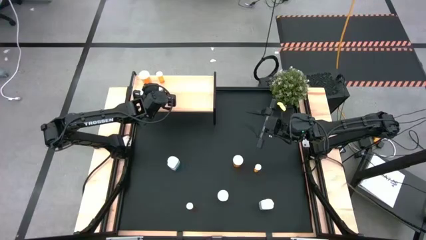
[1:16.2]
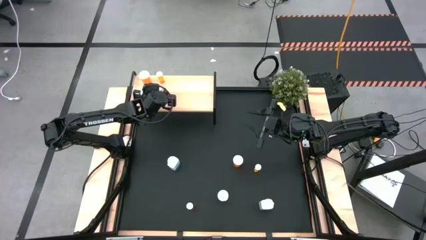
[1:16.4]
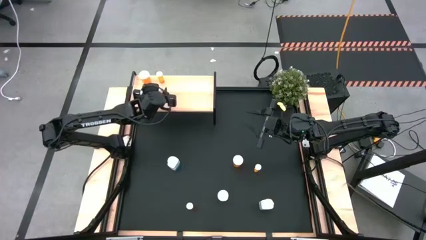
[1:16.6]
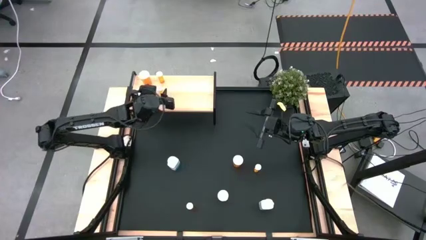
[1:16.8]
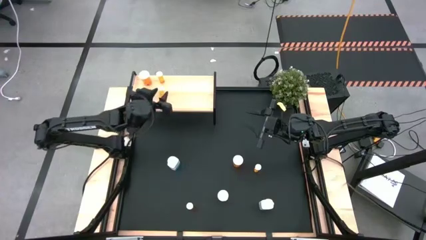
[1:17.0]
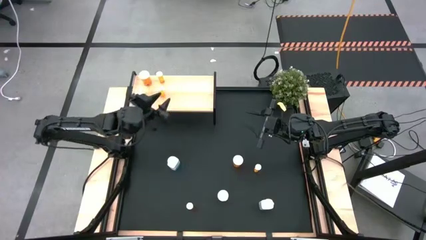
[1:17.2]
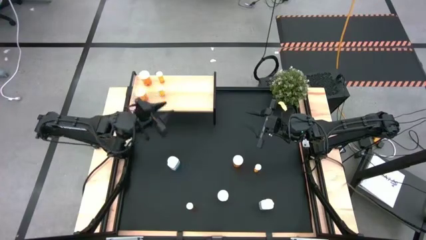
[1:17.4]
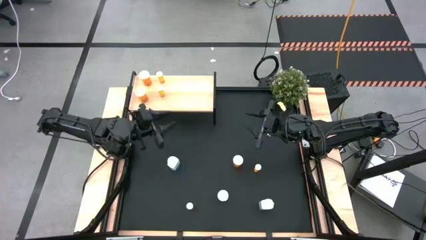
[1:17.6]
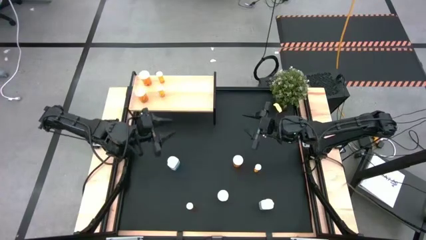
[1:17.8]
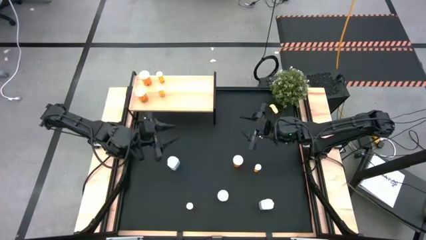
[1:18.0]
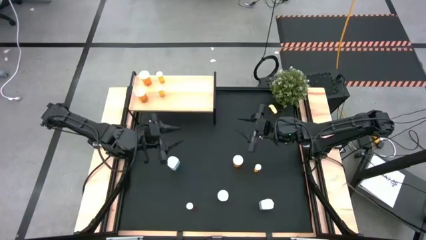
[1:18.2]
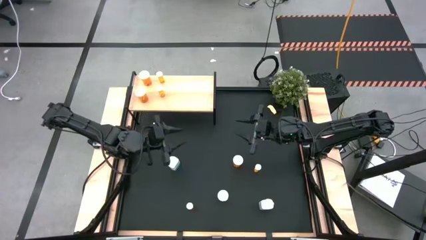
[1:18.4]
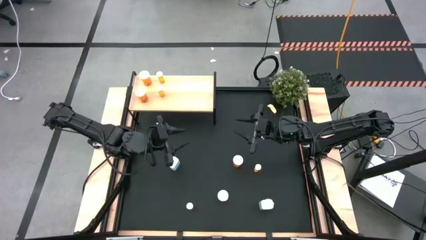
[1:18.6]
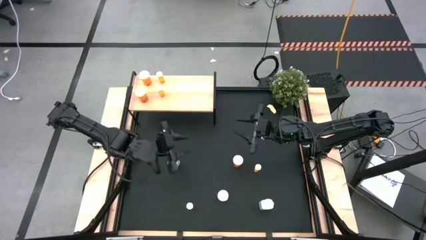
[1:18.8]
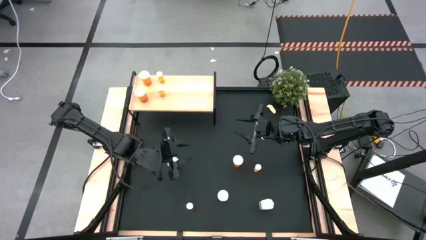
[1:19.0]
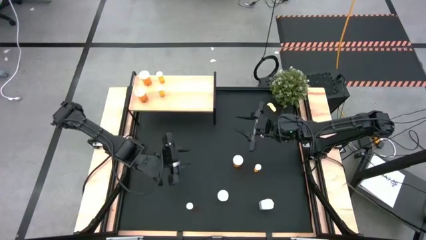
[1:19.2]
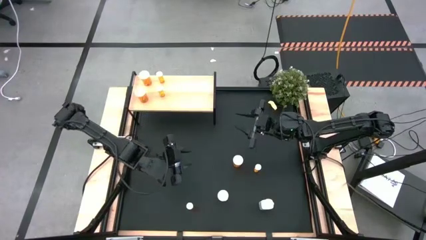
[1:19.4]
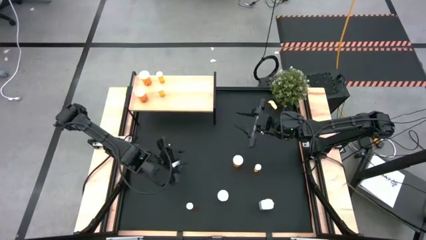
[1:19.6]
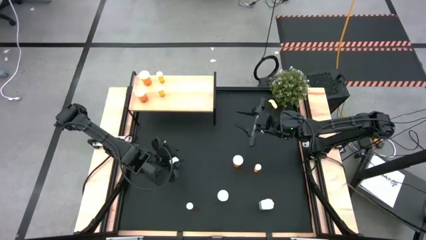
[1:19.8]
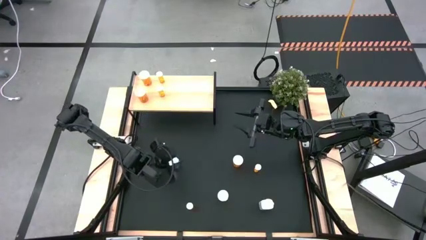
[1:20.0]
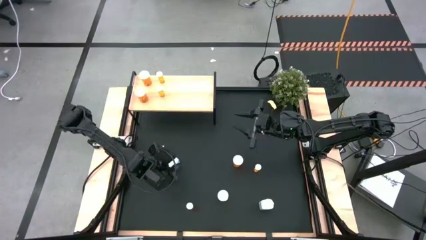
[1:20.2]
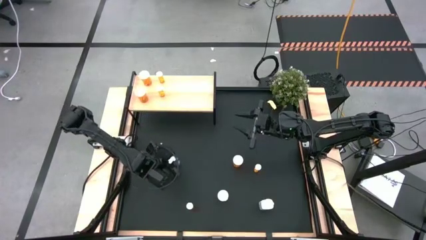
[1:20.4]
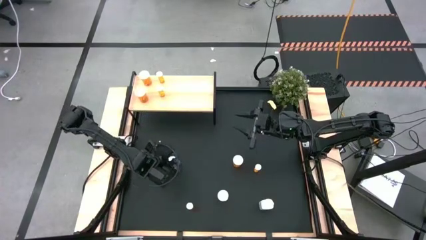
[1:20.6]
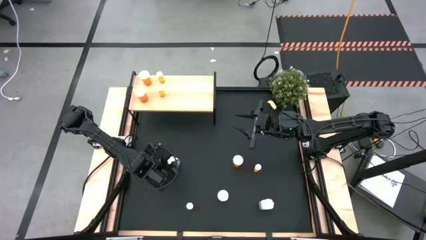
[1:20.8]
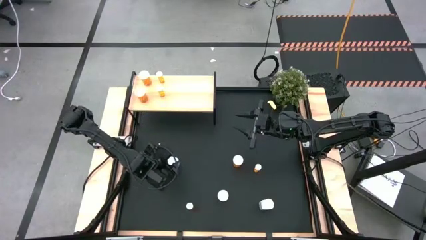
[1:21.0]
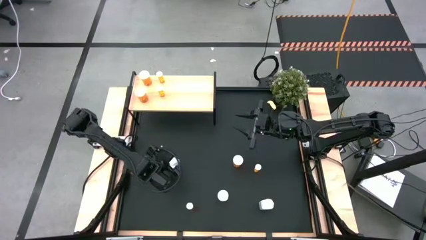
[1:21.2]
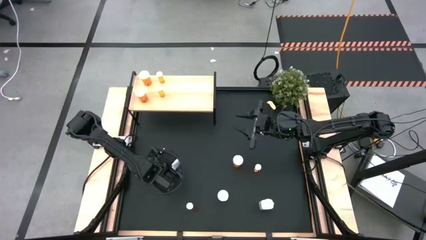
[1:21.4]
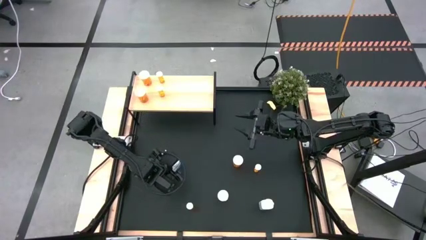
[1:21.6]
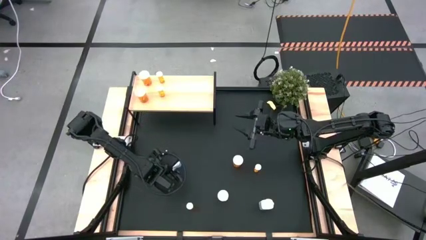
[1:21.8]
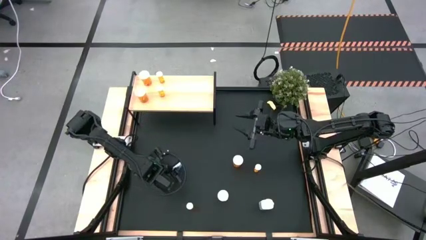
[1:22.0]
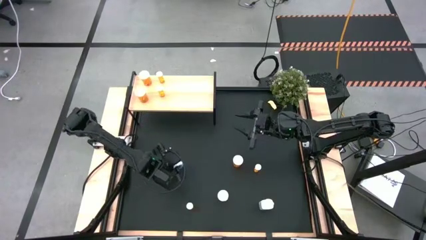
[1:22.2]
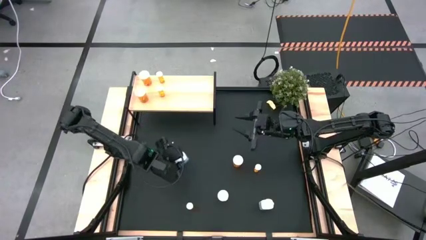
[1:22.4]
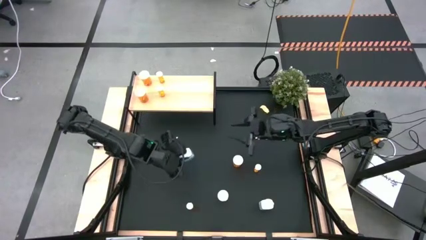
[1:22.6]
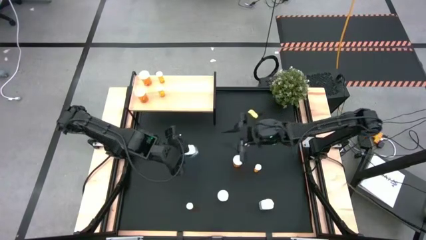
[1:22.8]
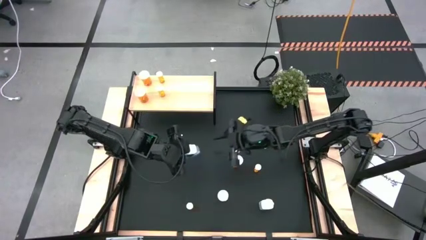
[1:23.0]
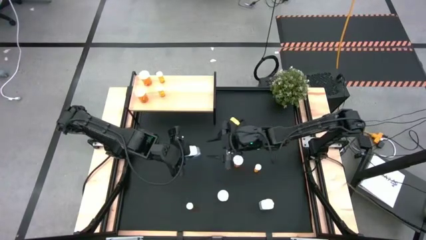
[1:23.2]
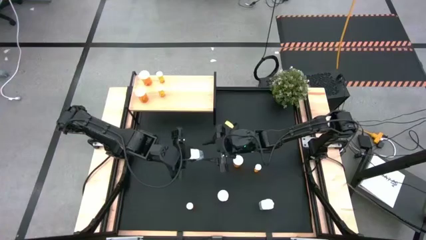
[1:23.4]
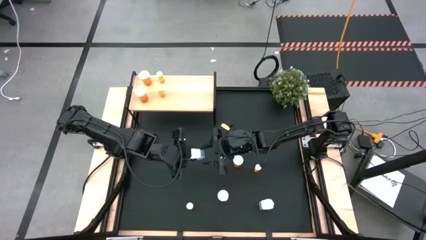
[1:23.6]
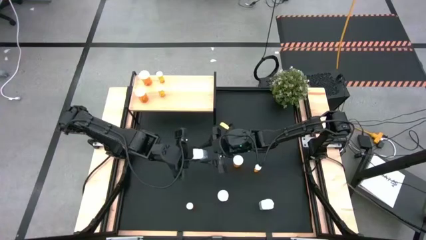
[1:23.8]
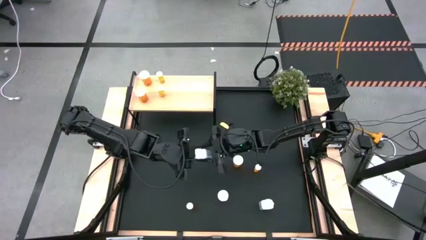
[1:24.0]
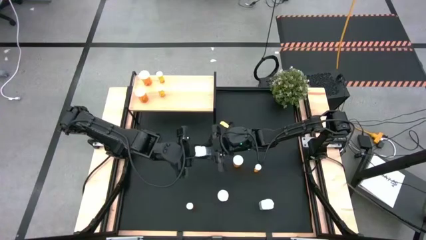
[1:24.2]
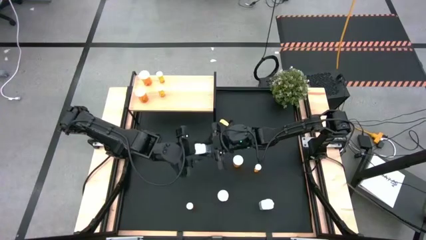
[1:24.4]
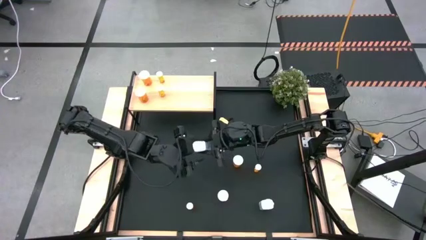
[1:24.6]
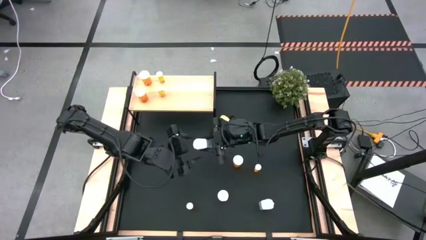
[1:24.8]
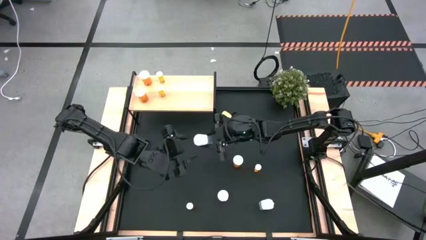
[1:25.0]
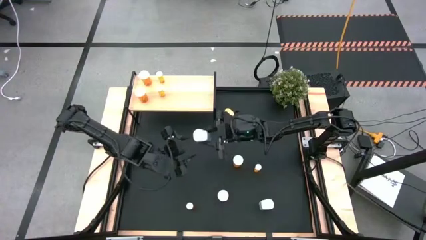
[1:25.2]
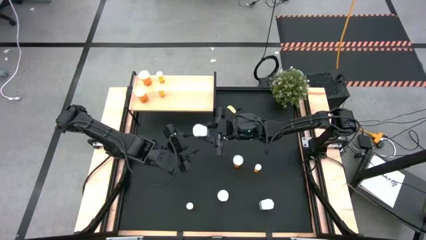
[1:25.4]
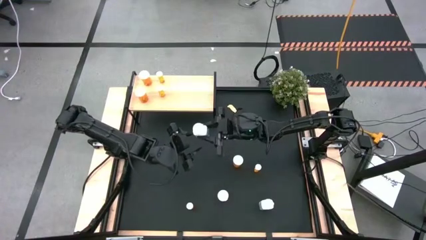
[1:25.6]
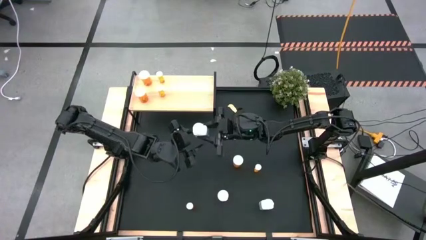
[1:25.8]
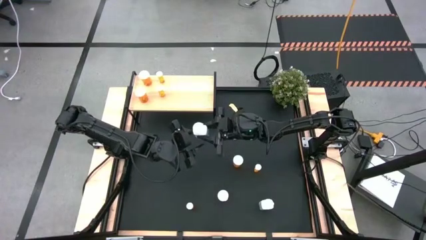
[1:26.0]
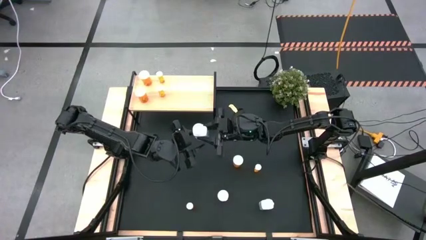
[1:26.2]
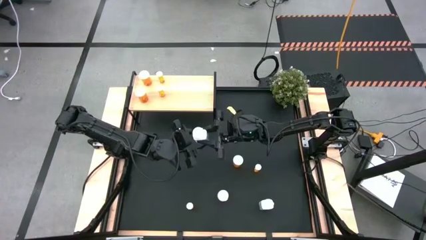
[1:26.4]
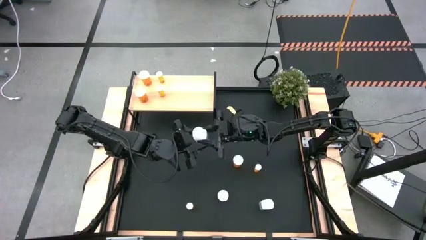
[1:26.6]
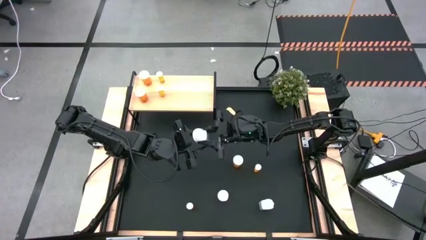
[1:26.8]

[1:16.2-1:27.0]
Task: Pick and place medicine bottles onto shelf by color
Put the white pill bottle on the shelf
